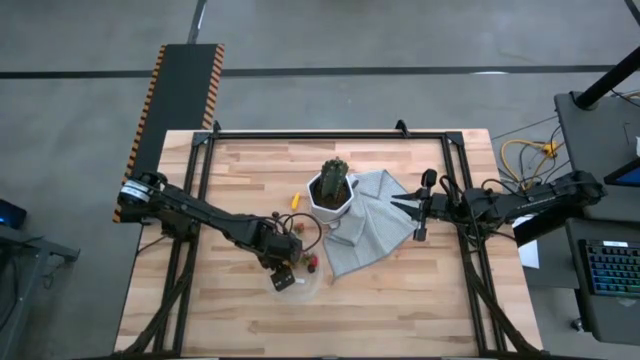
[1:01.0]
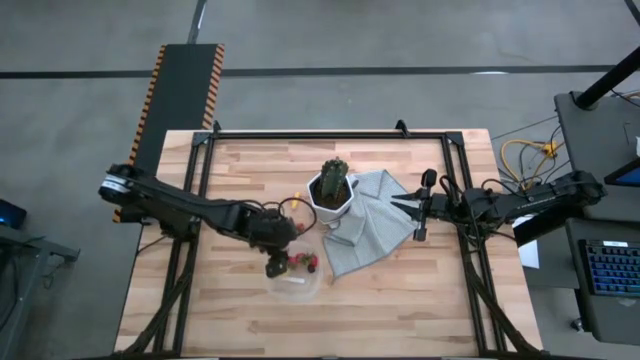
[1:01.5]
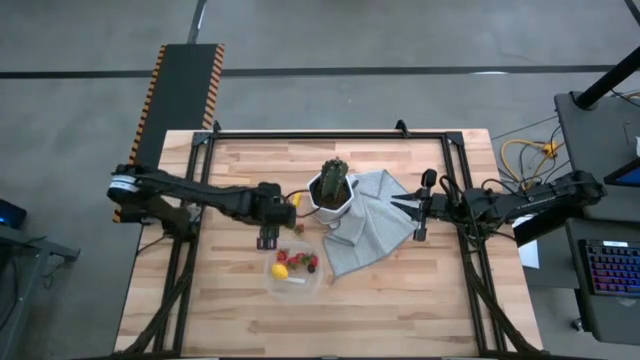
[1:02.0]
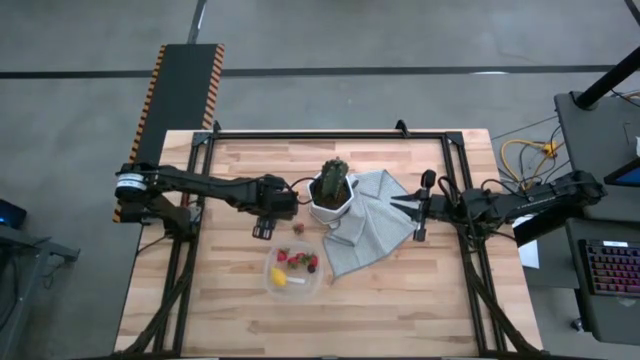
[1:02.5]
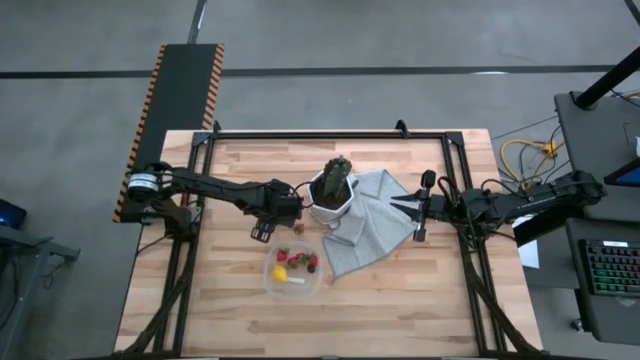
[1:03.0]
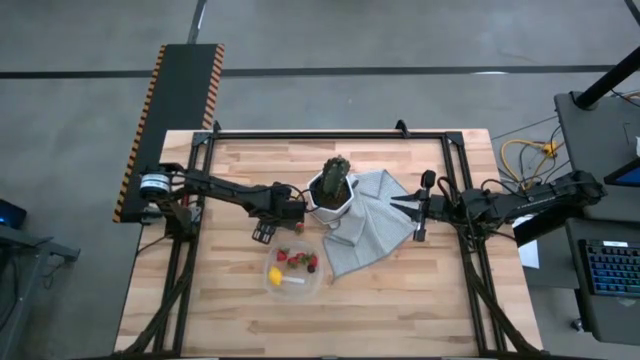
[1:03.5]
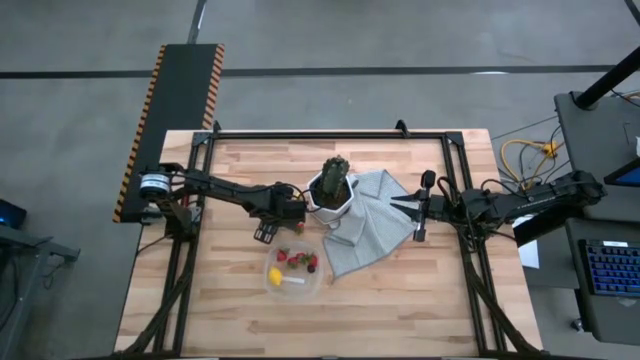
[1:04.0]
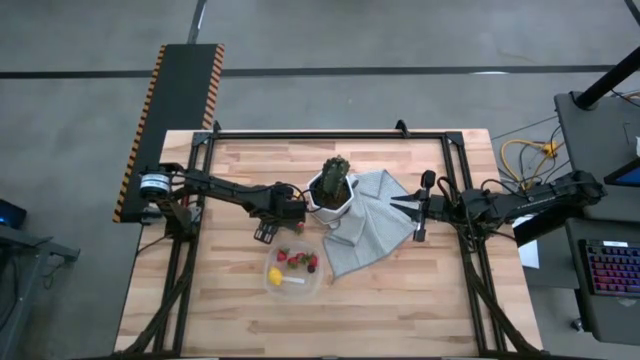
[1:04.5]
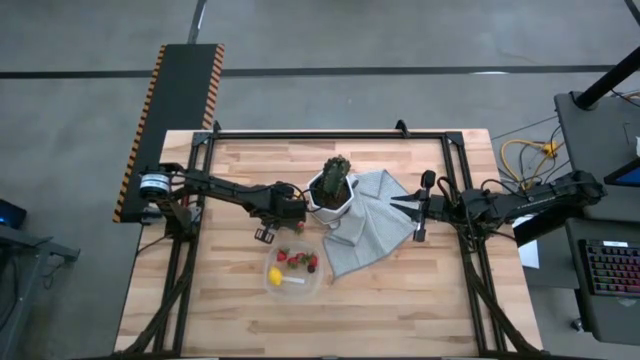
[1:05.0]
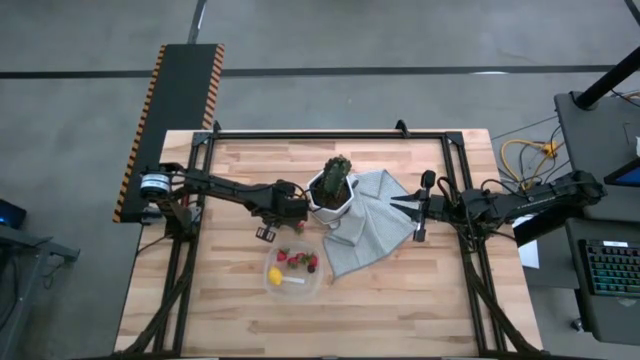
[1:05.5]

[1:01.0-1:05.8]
Task: Pick and placing Produce into tupperware
Put the black cherry into the transparent plastic container

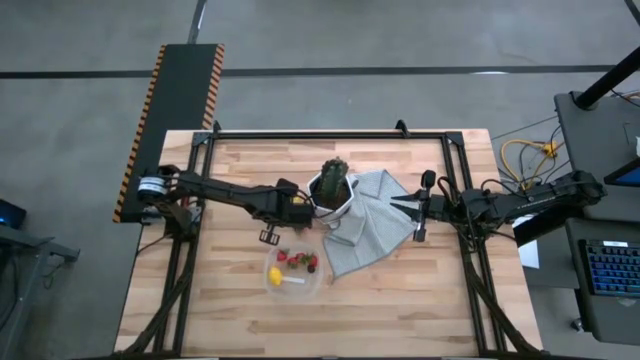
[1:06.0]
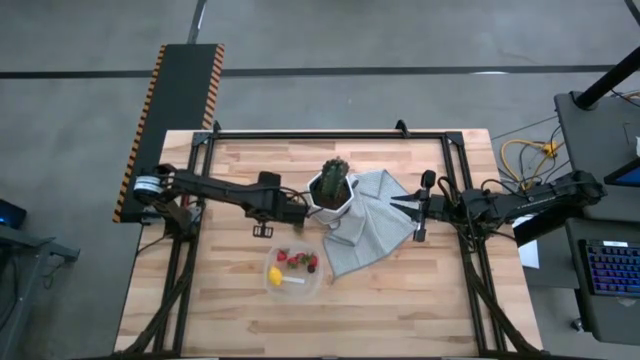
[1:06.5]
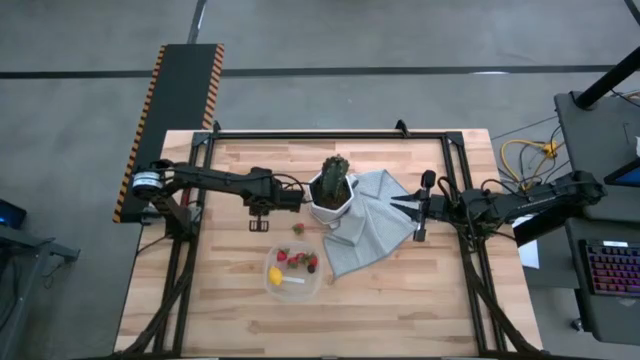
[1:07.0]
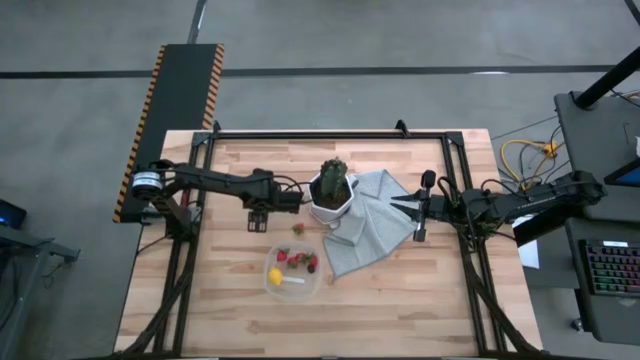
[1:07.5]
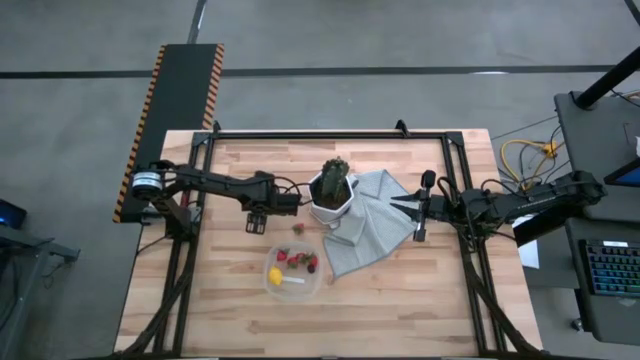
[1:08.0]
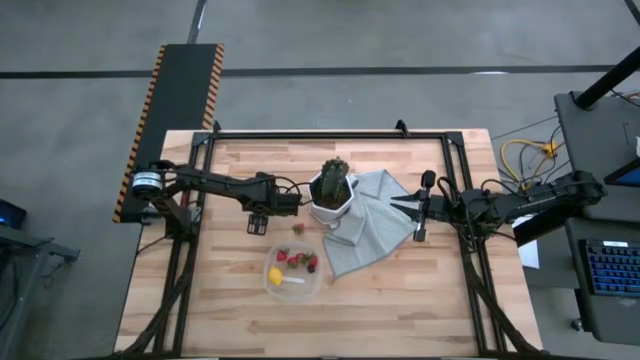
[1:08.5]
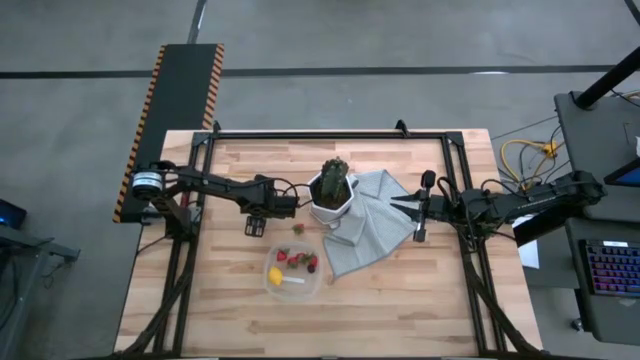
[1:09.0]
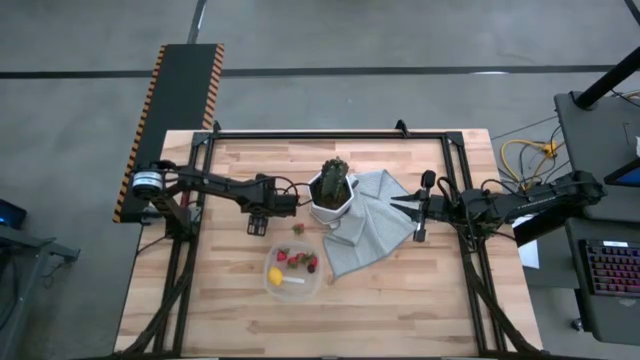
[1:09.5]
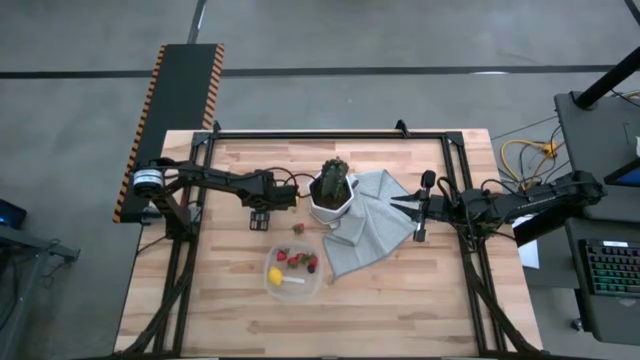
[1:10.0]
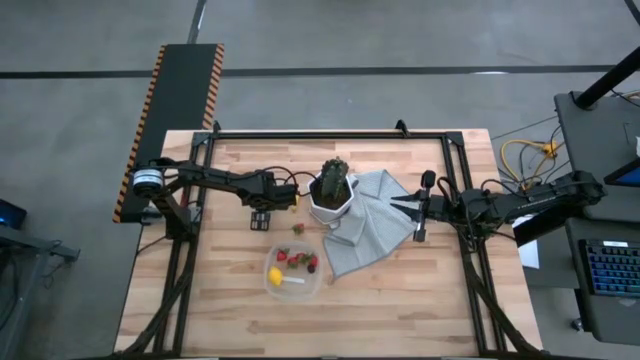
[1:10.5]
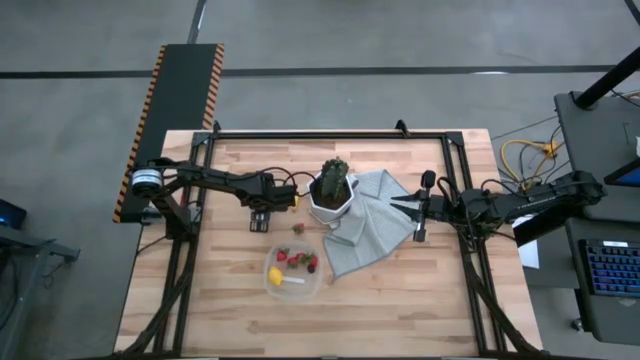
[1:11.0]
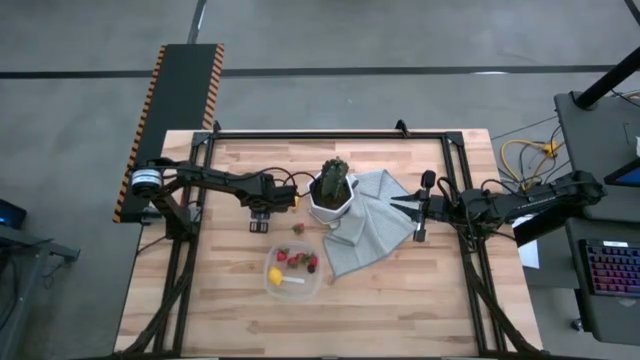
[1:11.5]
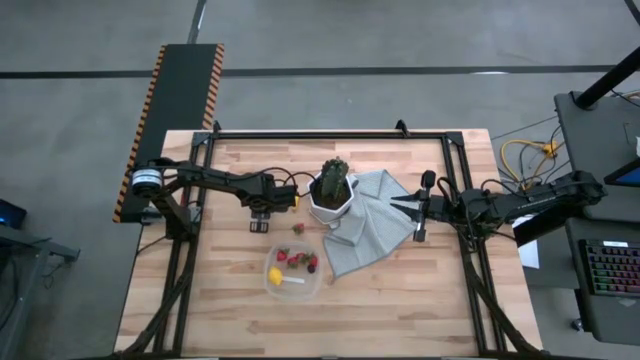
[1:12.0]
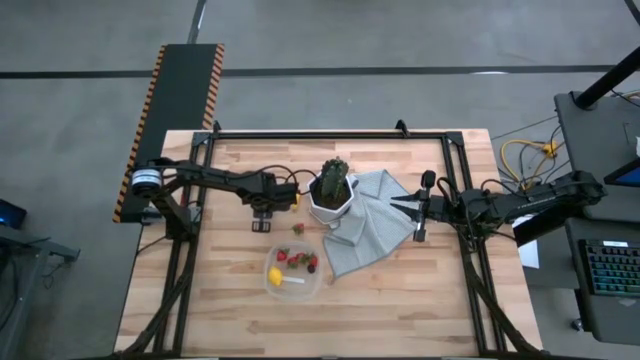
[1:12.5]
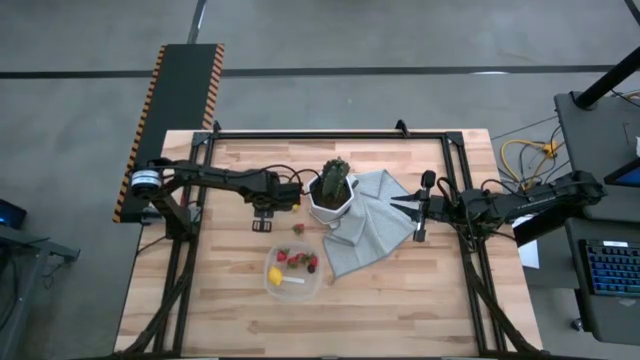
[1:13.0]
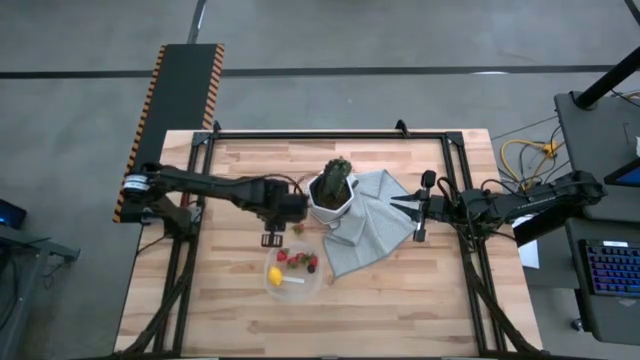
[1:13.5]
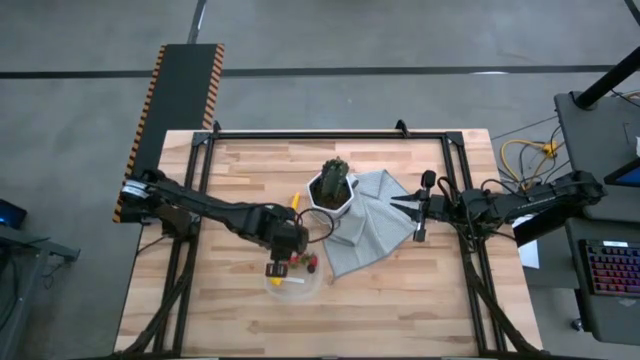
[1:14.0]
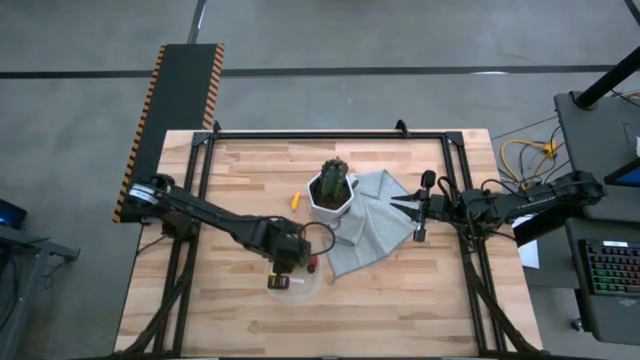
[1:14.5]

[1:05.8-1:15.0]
Put the black cherry into the transparent plastic container

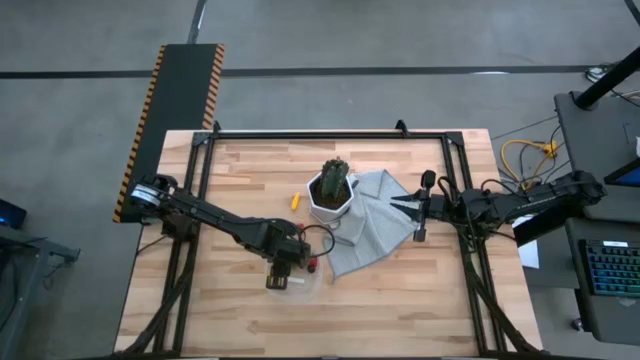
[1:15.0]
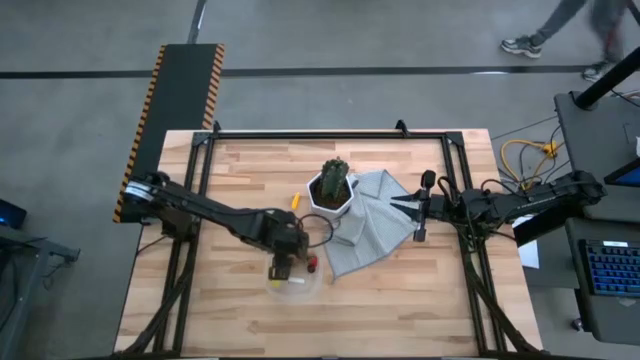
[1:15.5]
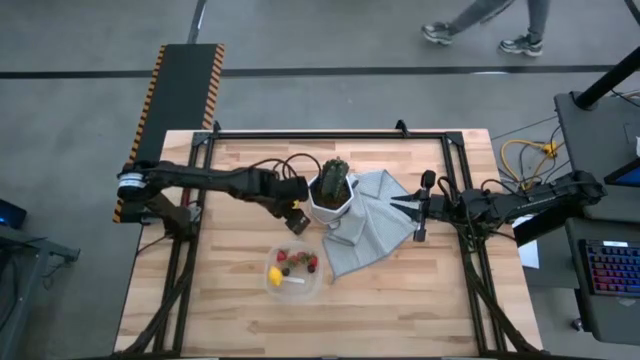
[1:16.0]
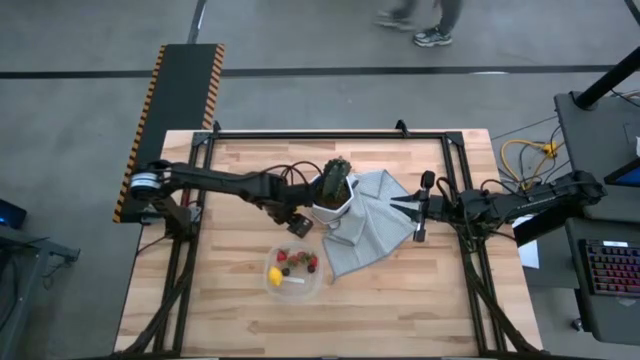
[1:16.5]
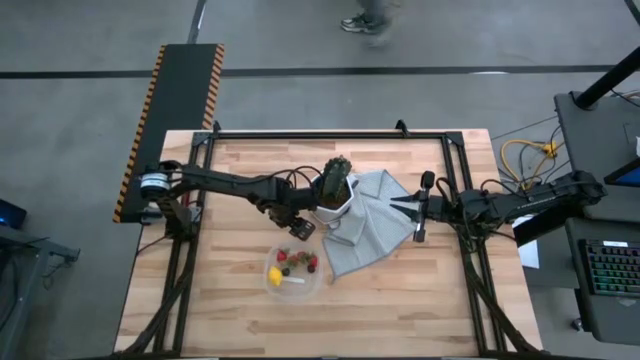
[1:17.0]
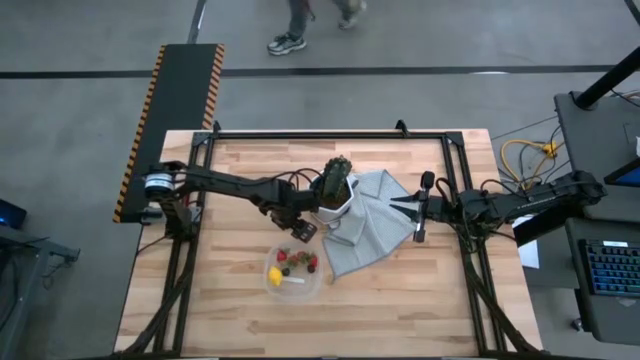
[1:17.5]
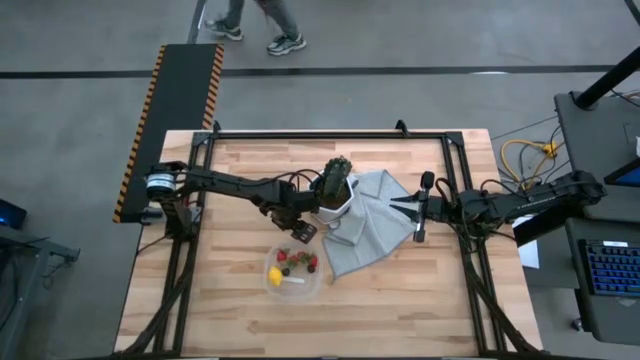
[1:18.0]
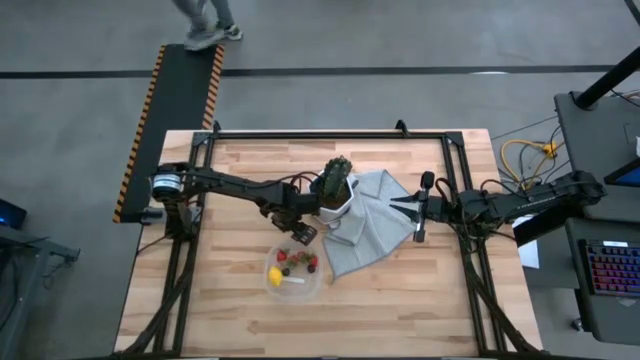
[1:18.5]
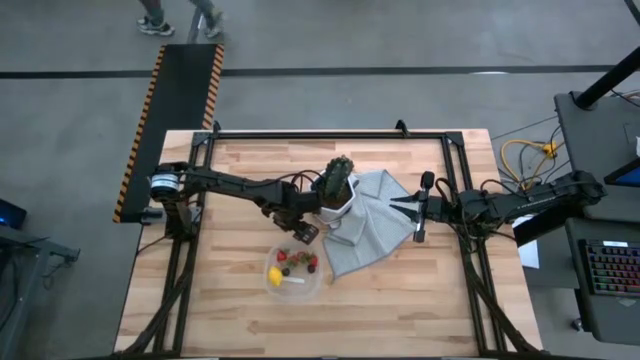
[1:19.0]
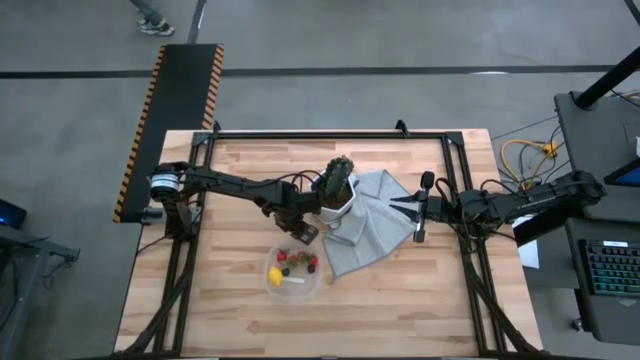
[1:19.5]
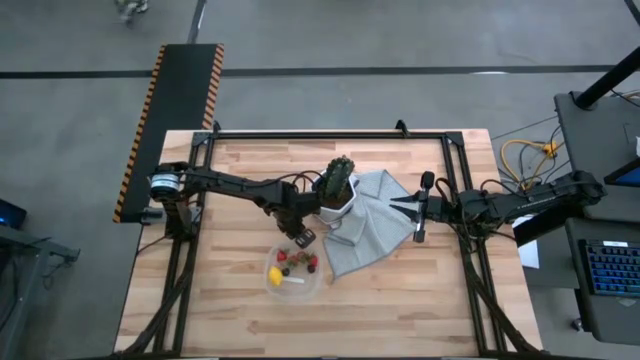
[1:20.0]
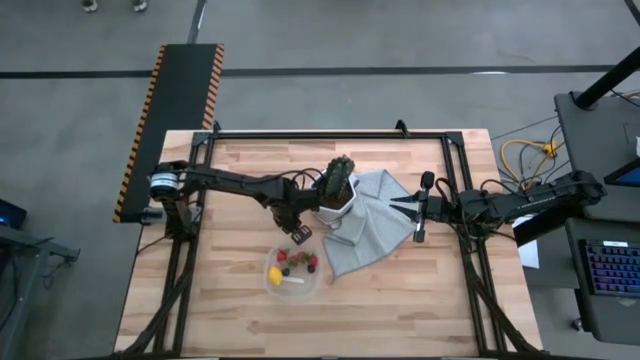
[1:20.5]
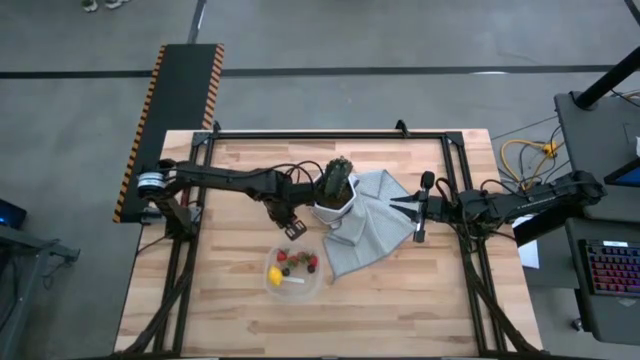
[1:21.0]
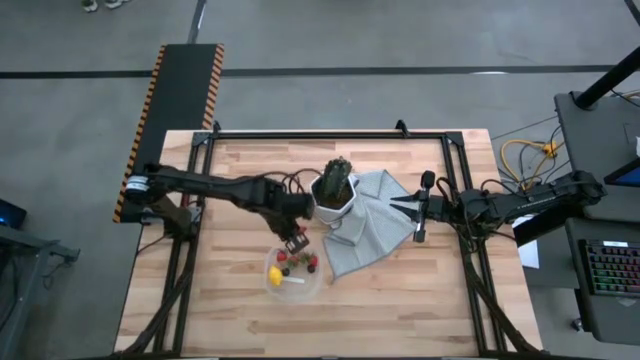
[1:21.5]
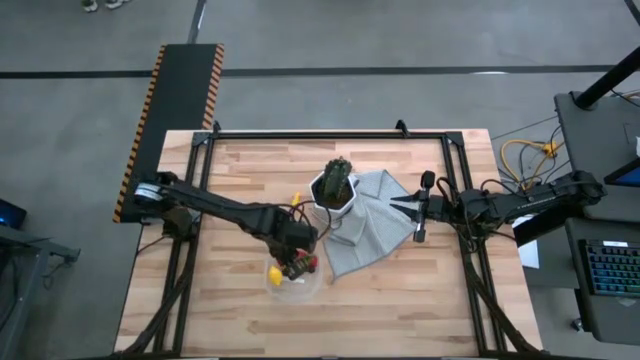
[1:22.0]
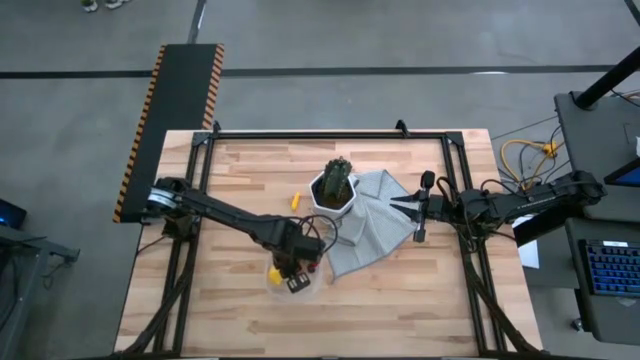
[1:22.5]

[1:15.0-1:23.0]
Put the strawberry into the transparent plastic container
